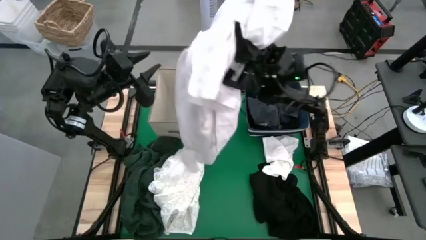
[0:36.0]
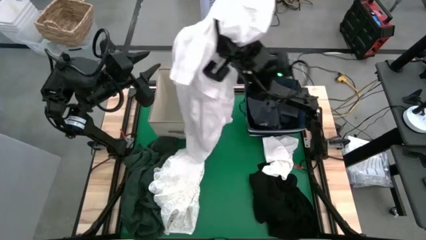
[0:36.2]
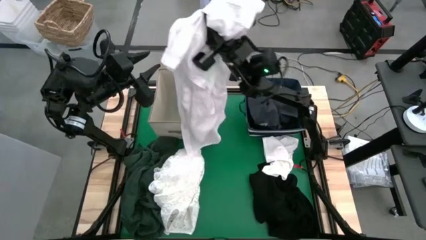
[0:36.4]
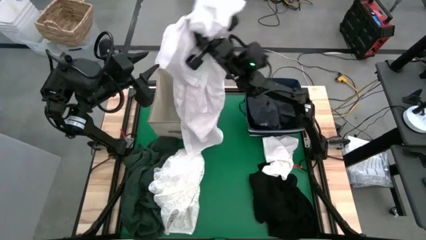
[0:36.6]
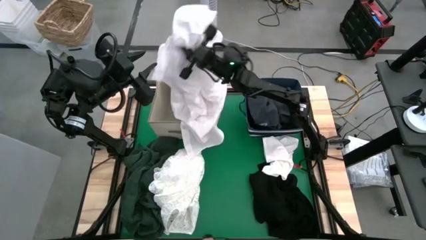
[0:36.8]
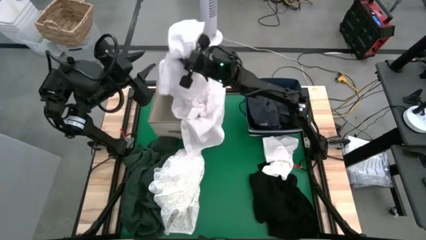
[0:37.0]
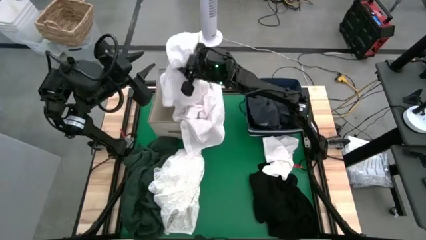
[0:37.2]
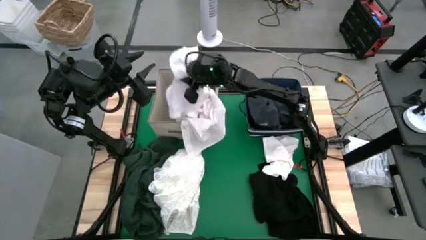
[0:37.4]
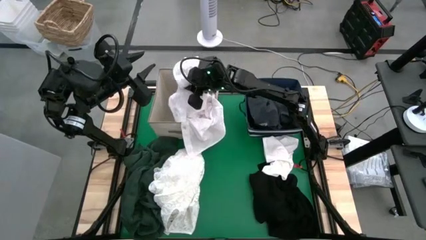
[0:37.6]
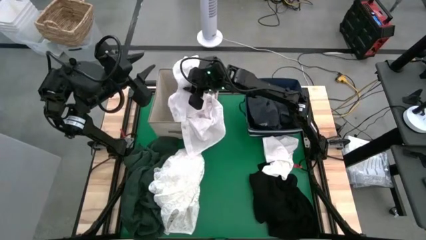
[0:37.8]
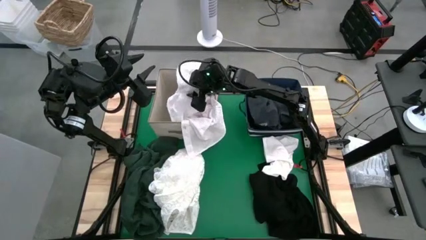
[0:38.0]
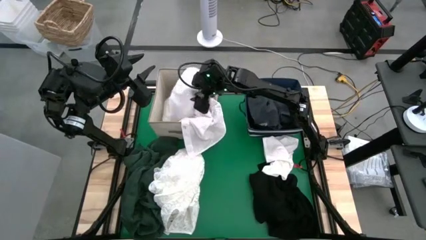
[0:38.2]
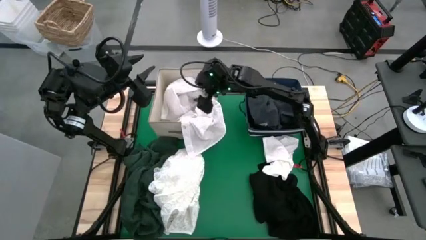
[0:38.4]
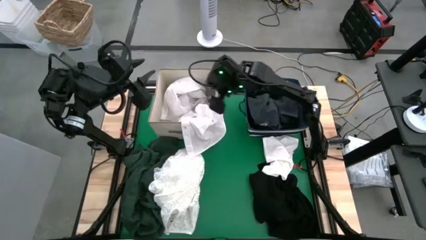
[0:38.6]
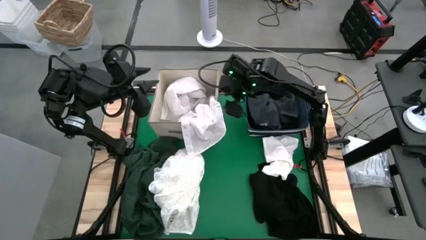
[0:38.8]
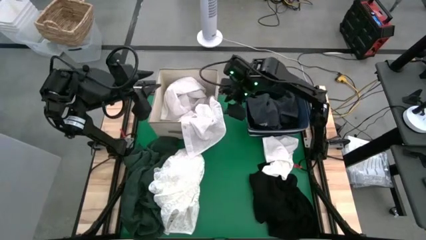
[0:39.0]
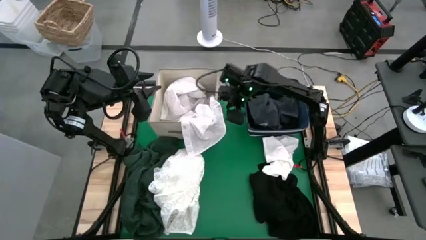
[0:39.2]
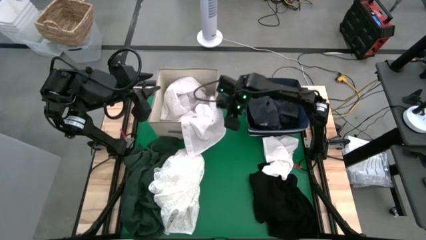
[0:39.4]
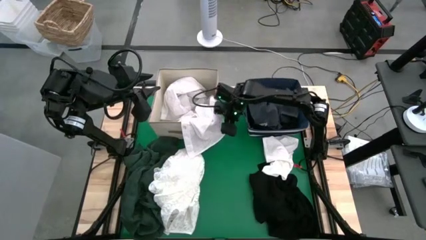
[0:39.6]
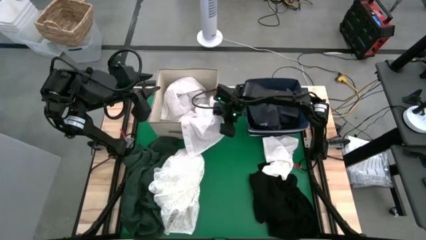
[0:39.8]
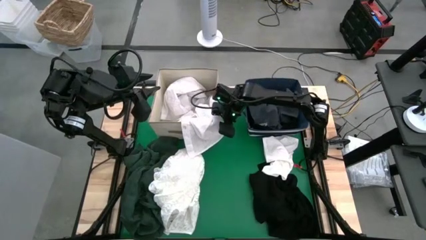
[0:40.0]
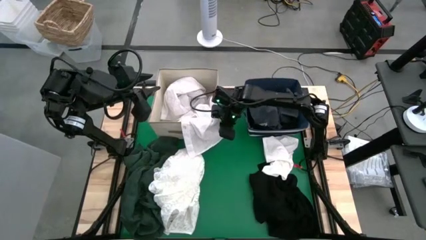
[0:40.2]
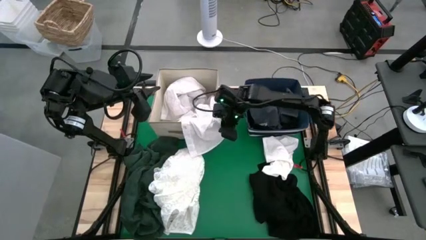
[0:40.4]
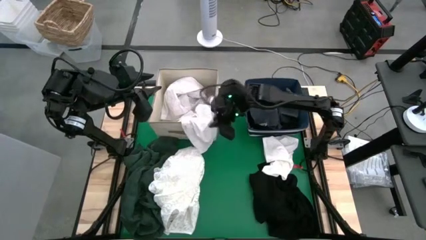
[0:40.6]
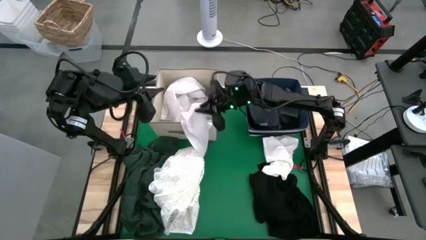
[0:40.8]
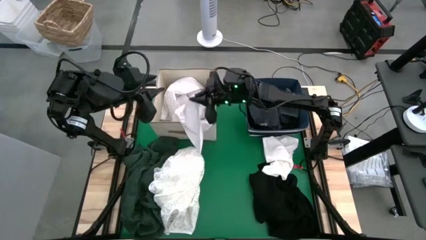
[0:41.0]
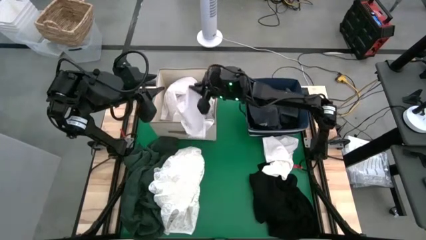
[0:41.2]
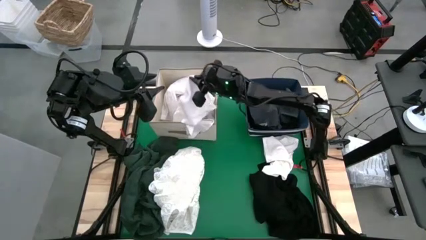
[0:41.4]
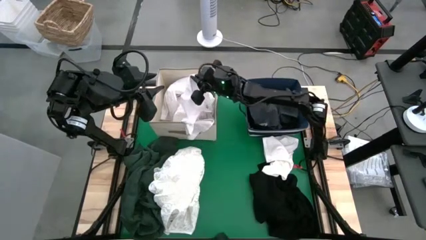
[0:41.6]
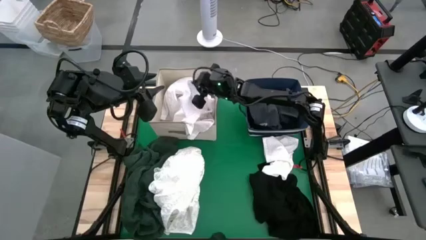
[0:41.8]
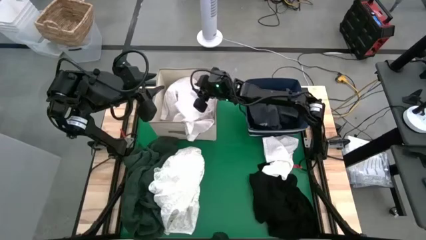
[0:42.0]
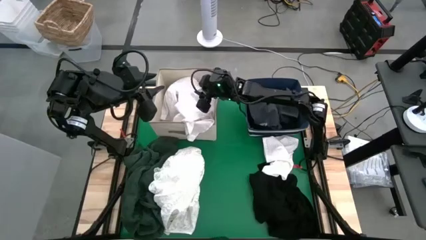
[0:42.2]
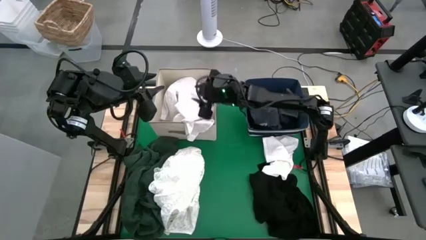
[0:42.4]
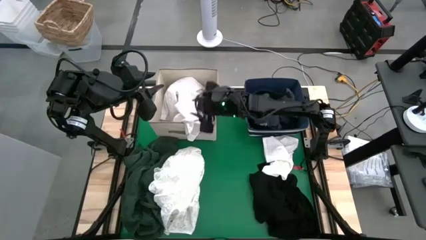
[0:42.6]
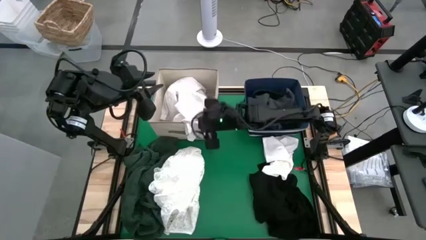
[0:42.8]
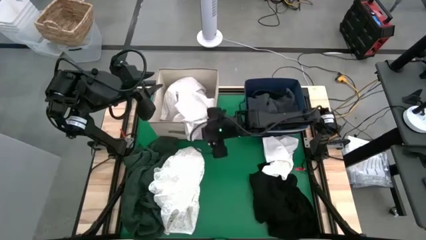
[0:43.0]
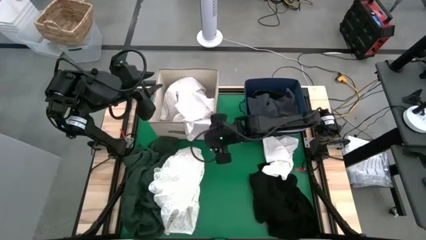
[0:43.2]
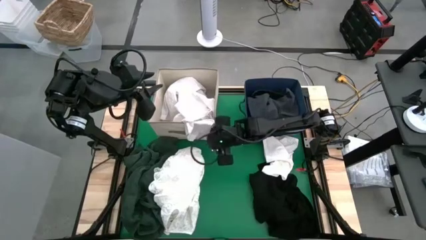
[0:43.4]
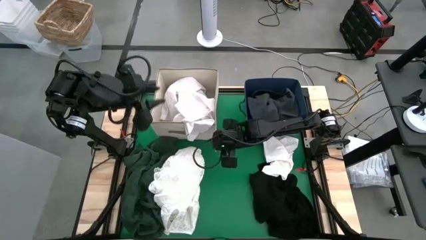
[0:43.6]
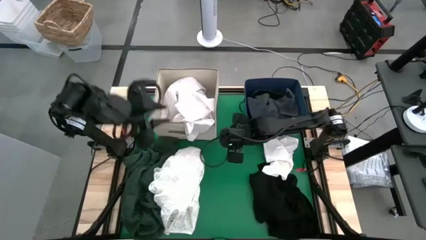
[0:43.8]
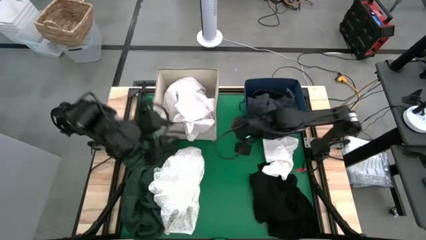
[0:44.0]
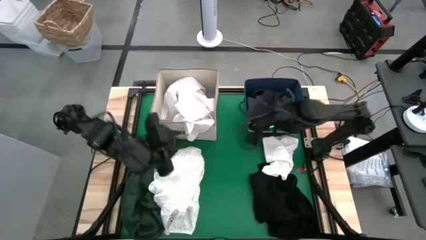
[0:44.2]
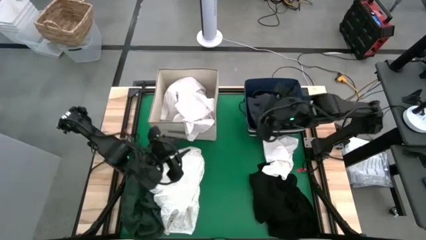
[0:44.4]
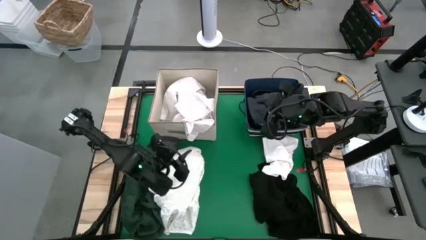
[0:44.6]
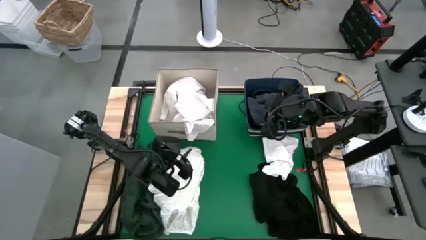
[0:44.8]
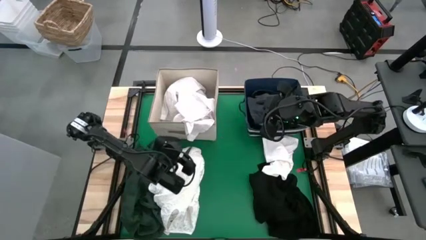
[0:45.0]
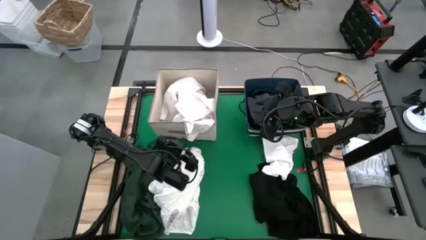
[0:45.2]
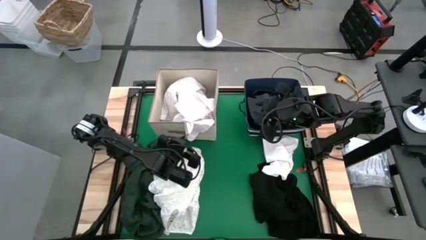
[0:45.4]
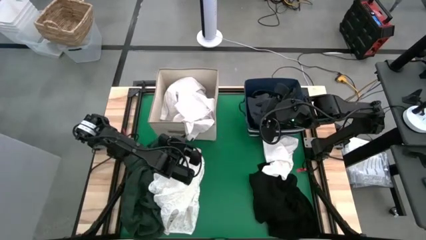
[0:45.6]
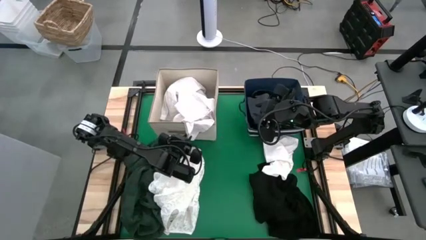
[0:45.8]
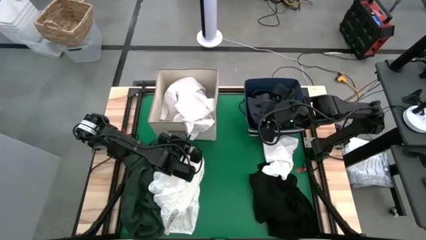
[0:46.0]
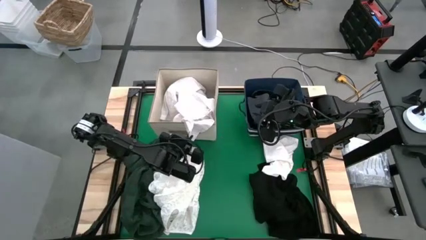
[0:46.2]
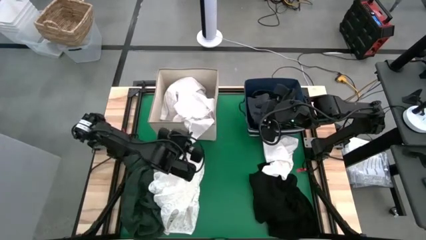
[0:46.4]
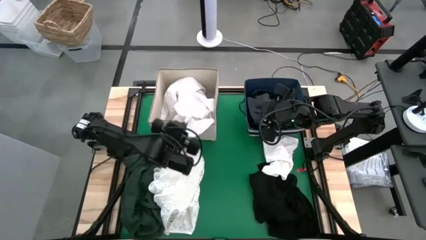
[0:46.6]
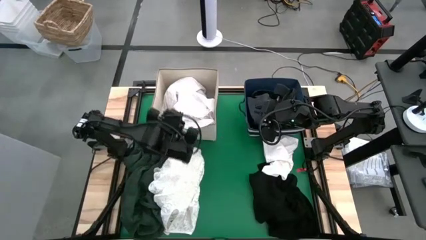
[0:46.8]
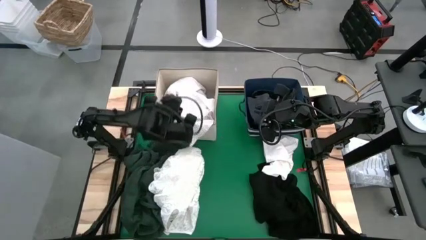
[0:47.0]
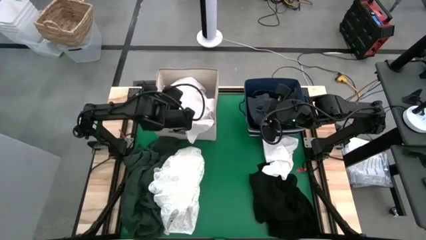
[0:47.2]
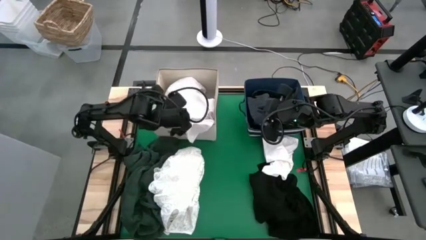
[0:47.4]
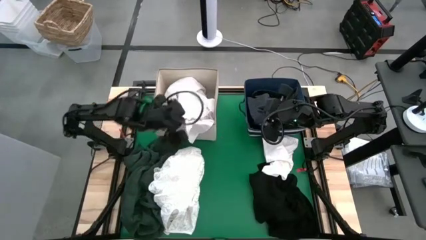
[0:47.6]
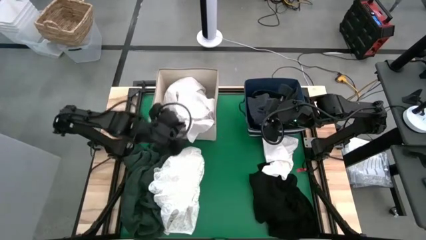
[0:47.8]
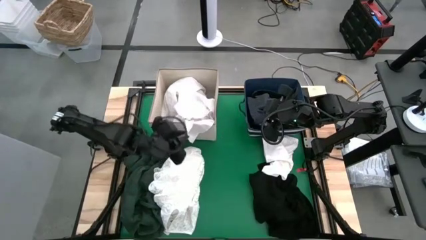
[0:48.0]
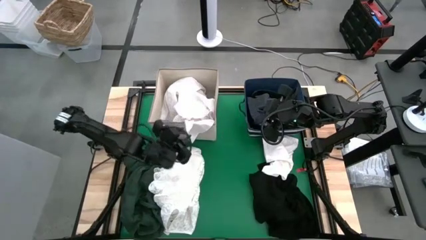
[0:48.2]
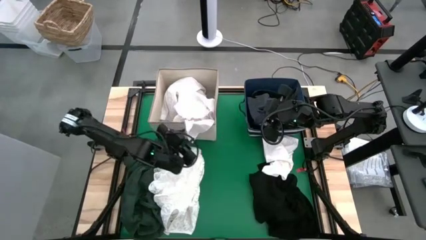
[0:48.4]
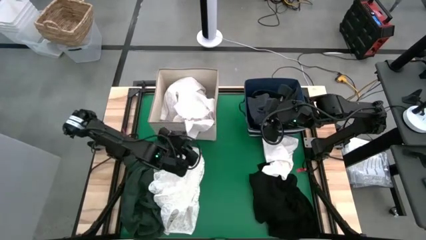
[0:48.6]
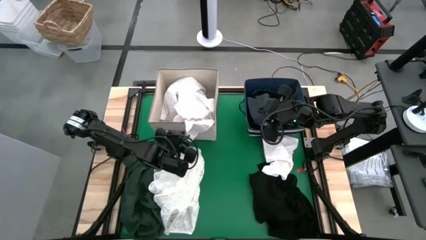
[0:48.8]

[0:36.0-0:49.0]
Put the right white shirt into the white laundry bin

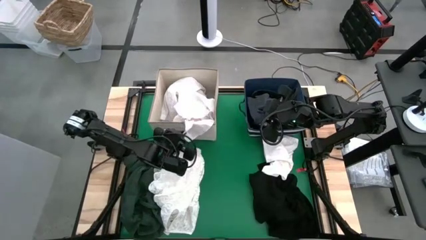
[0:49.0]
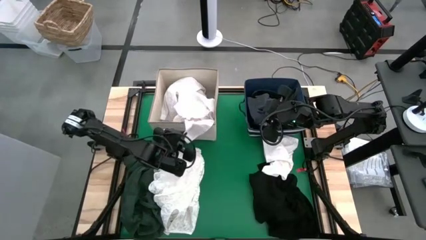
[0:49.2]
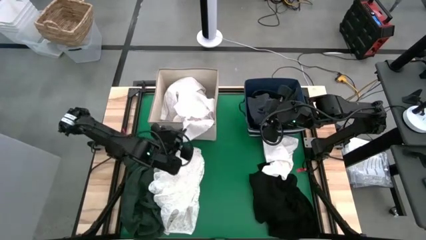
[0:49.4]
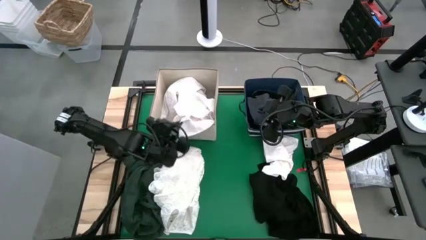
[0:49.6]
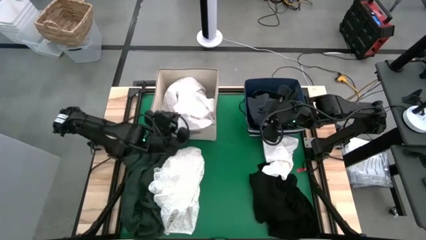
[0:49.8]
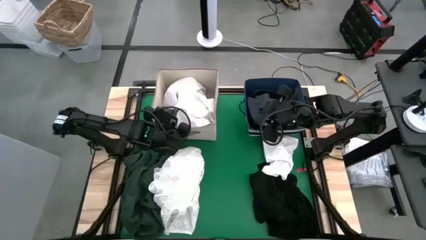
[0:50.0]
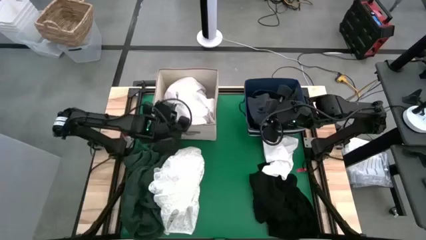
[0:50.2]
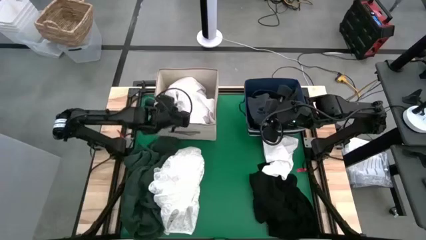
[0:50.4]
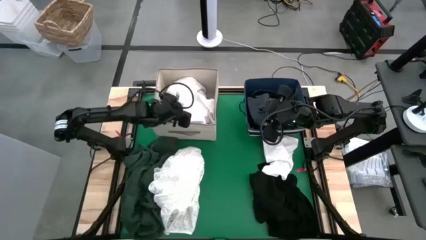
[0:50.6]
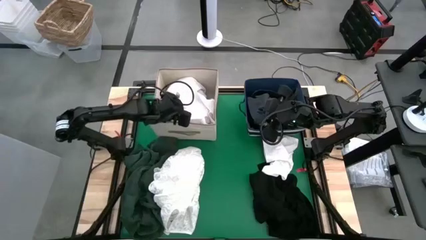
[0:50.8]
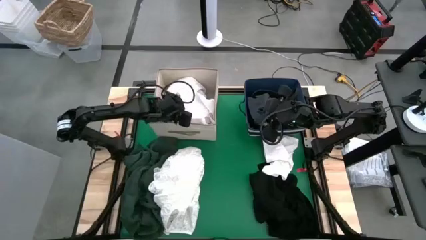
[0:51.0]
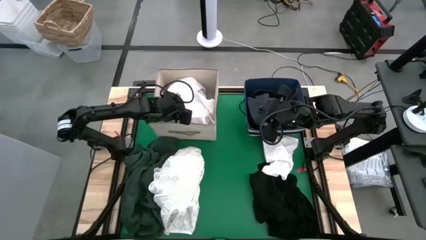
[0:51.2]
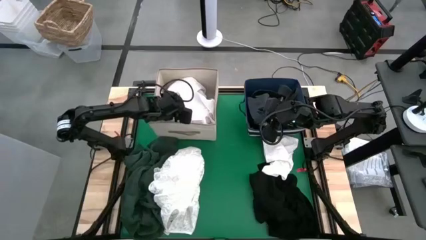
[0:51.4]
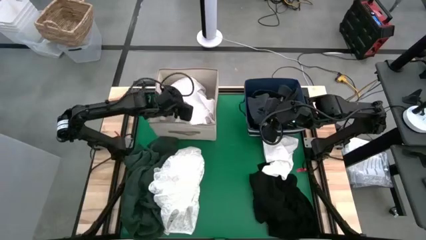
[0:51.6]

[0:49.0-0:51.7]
Put the right white shirt into the white laundry bin
